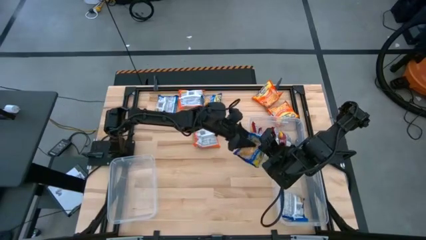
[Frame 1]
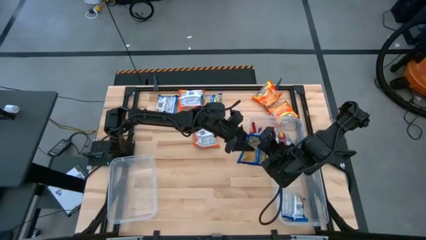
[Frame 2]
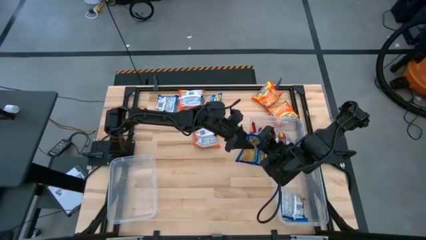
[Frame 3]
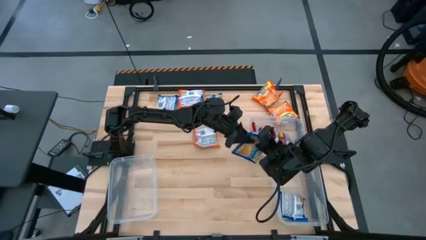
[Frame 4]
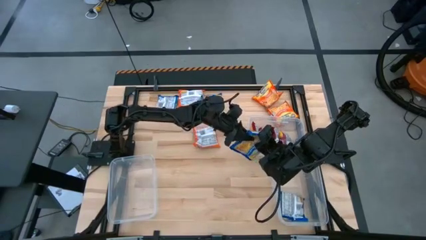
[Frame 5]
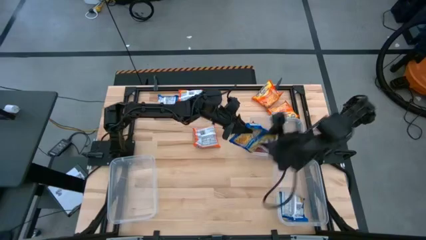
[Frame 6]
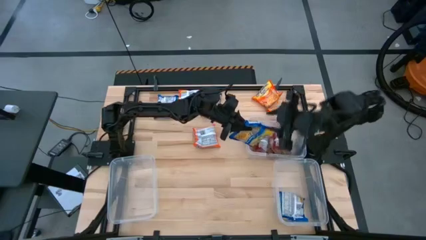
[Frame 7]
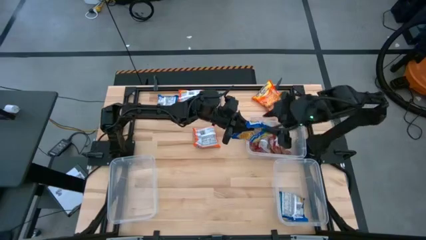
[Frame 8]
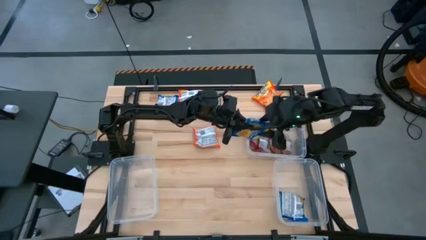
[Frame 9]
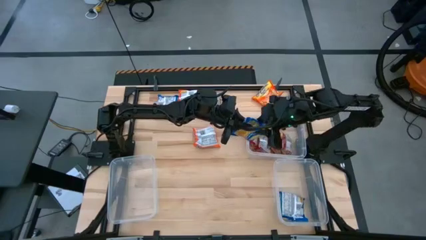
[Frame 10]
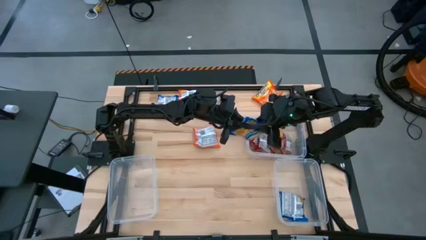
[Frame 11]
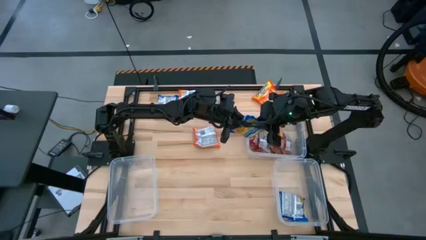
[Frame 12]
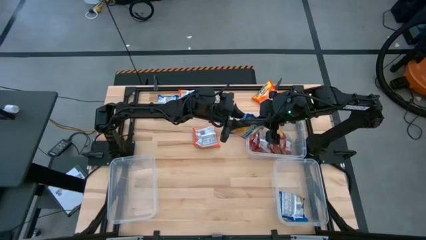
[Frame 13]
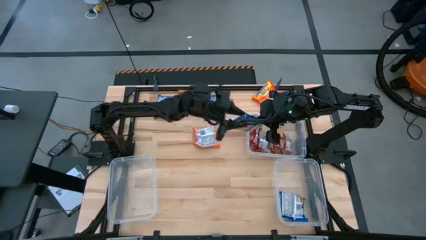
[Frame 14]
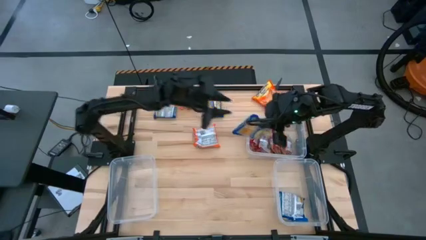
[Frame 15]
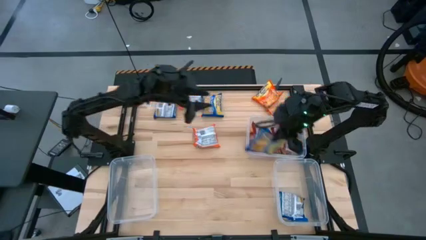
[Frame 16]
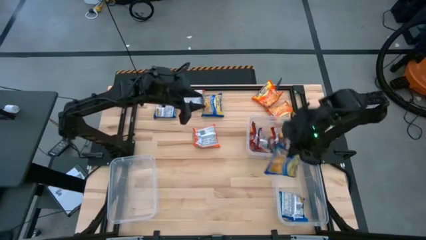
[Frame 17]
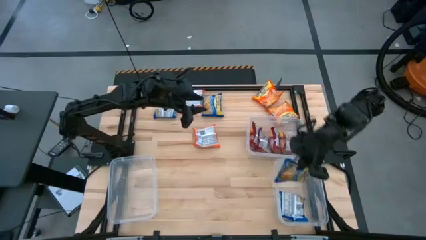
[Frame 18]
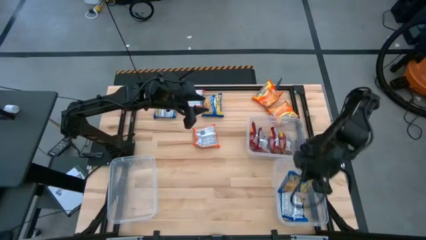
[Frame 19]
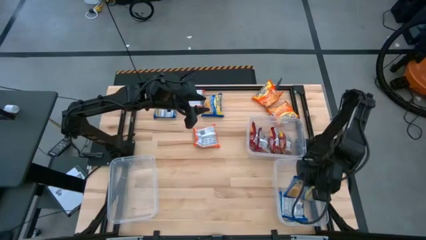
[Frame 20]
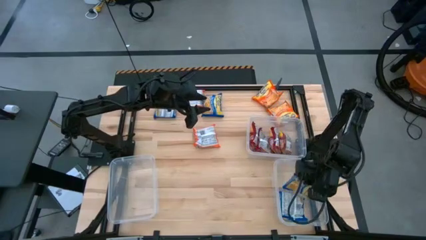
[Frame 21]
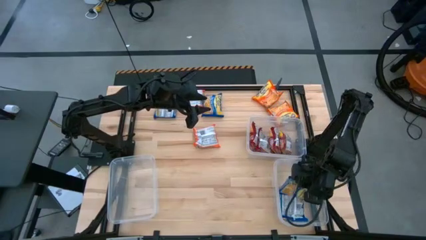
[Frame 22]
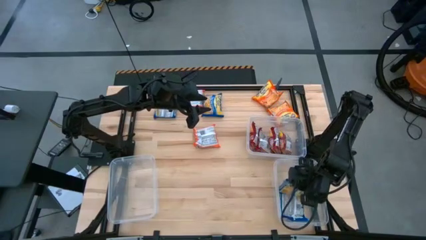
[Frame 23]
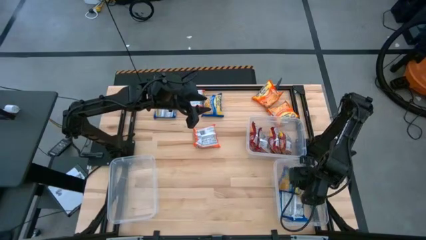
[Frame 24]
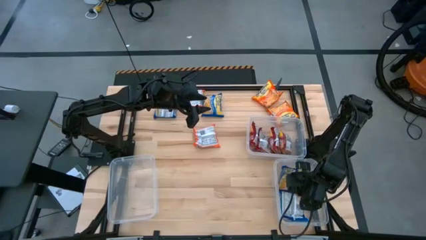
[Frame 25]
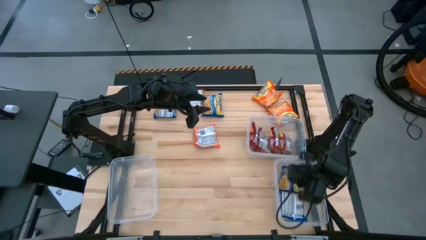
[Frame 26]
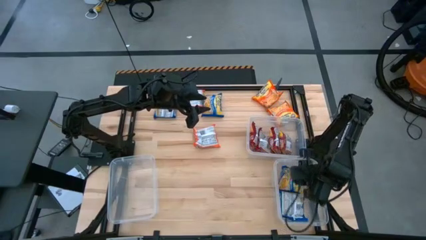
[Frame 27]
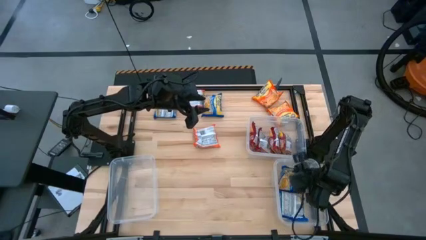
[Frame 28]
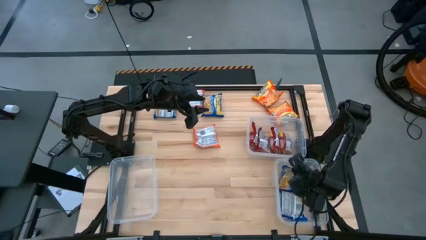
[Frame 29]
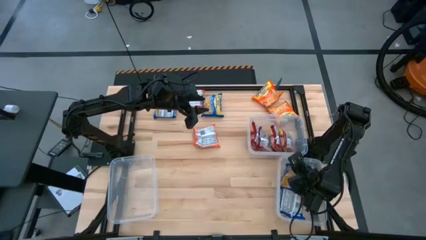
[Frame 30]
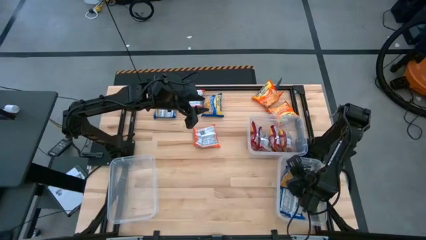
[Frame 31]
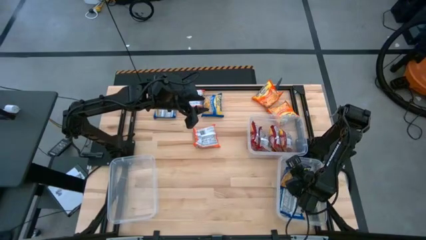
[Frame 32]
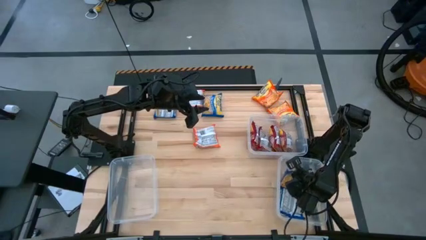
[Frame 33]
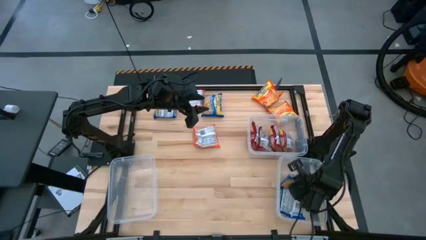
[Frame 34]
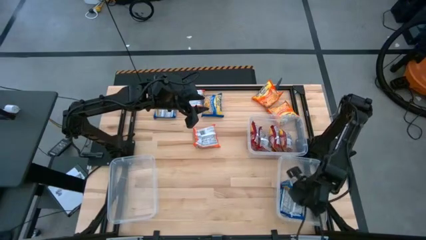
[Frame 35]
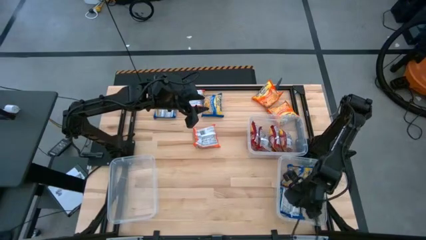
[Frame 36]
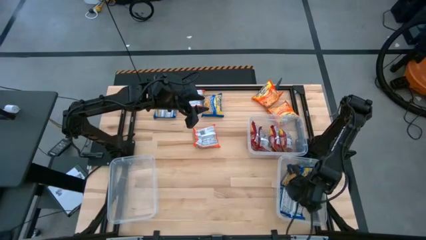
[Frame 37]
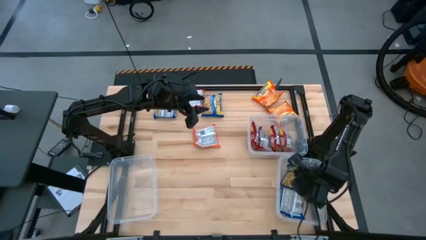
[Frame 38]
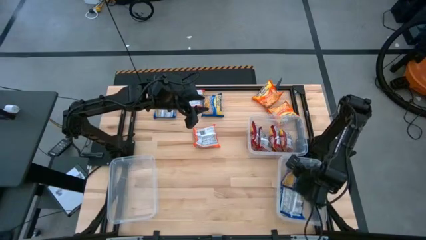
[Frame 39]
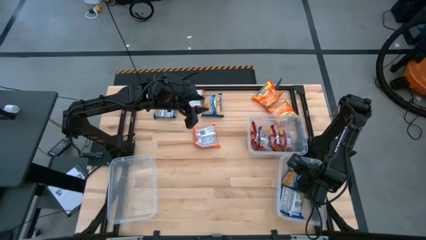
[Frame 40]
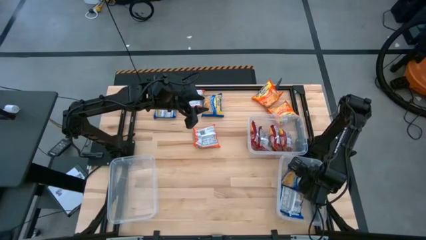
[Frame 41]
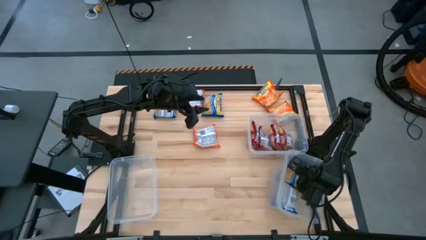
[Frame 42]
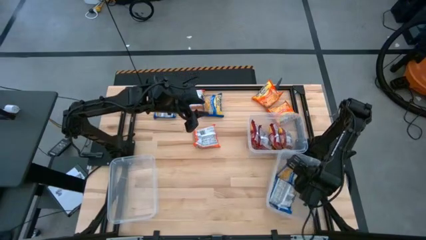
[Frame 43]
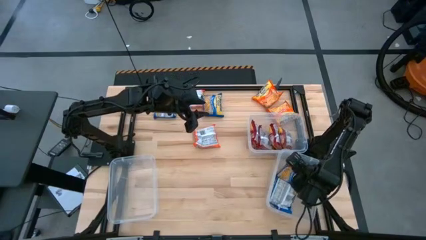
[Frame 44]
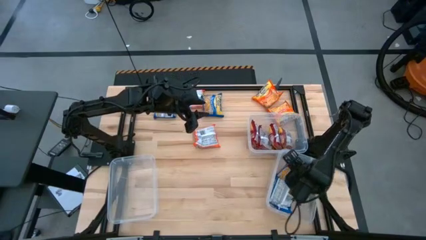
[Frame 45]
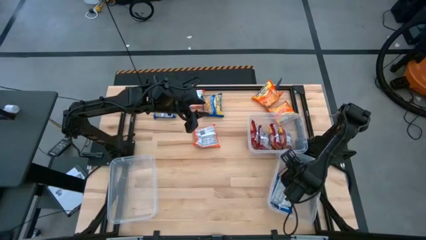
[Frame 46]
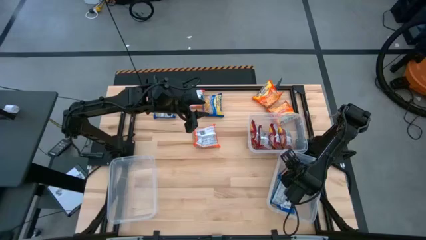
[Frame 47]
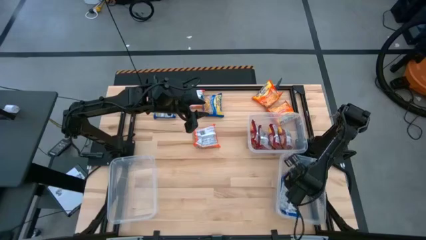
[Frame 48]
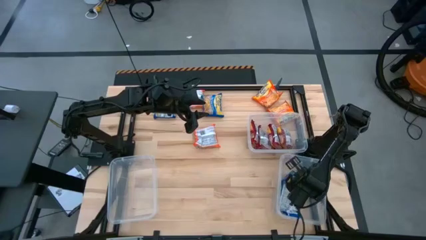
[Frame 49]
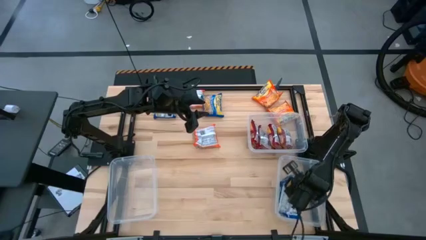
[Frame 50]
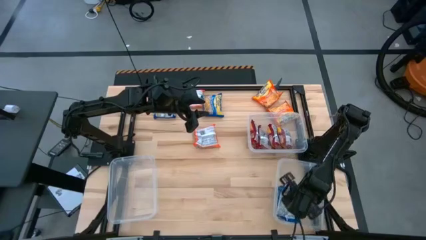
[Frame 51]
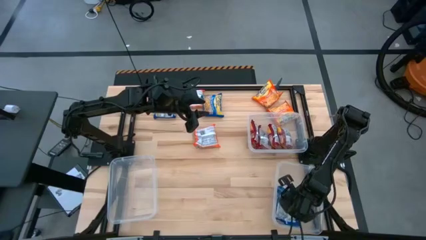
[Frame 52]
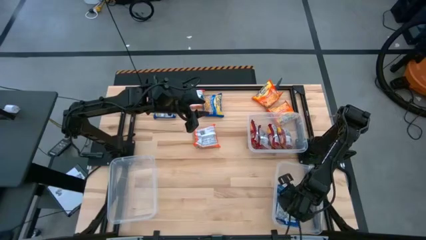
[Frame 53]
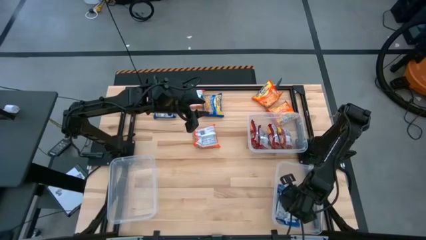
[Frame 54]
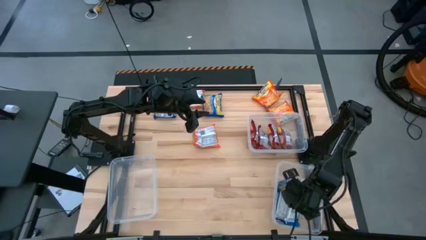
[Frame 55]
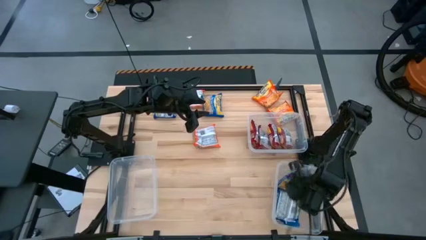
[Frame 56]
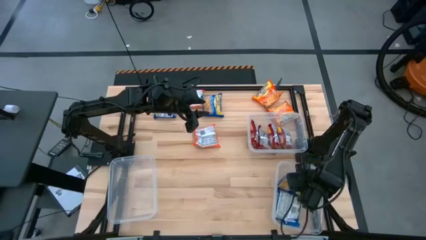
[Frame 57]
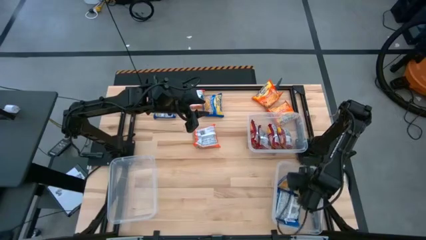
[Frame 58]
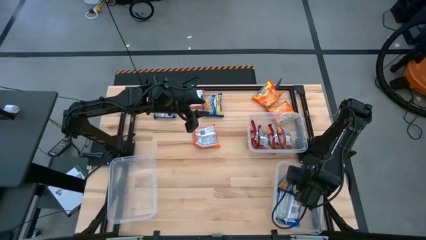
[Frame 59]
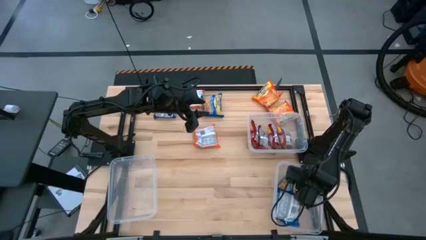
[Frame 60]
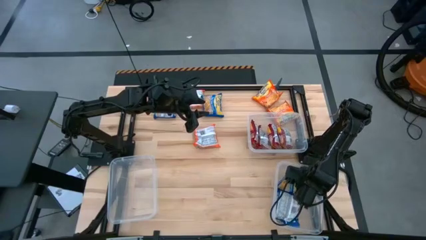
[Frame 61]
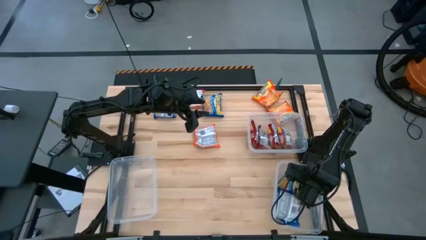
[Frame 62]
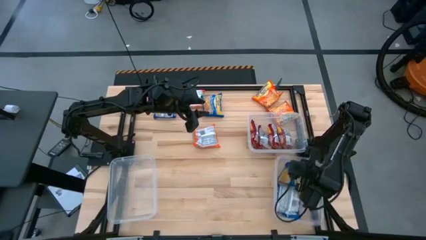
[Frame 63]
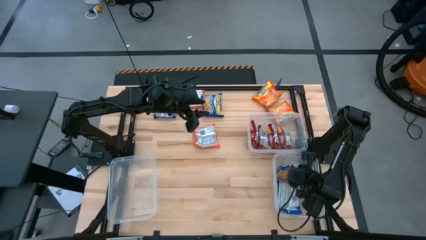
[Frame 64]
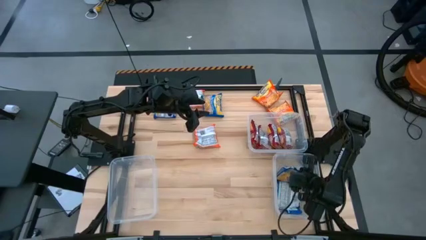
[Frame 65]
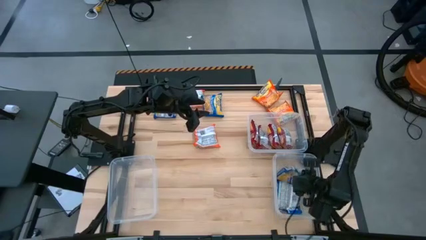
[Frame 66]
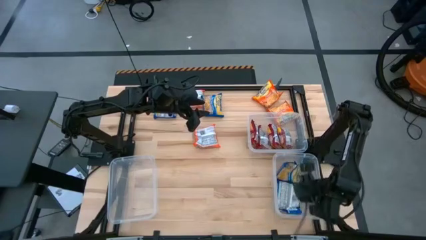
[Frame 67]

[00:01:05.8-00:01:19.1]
Task: Sort Maruchan noodles
Put the blue noodle pack into the bottom right container
